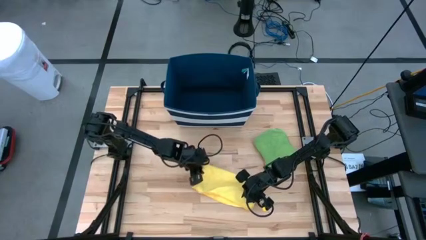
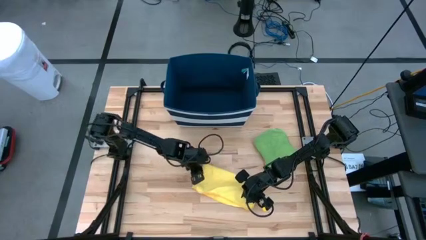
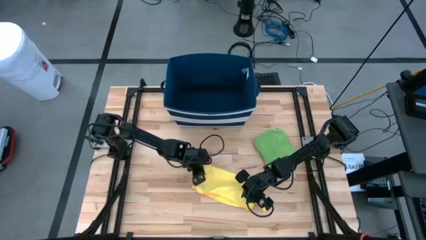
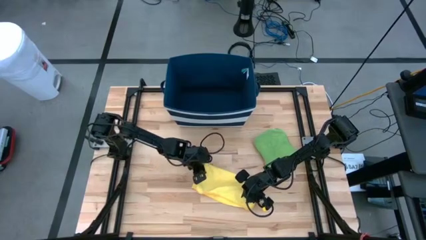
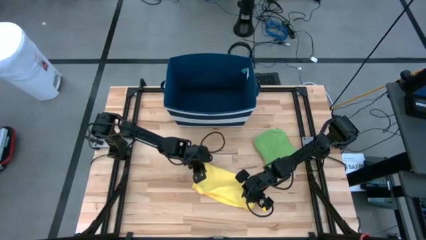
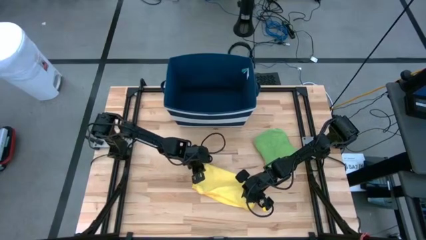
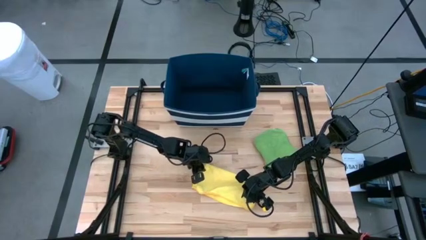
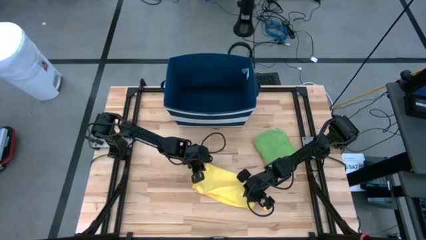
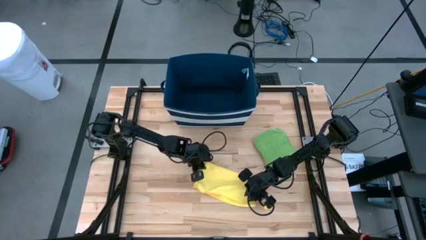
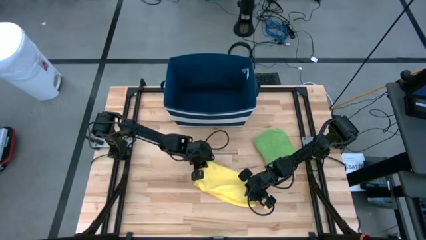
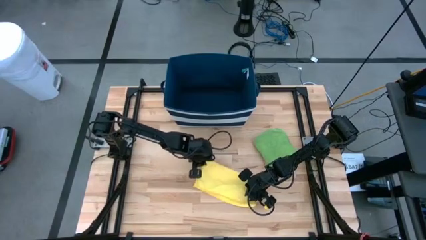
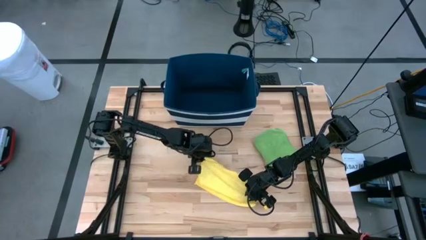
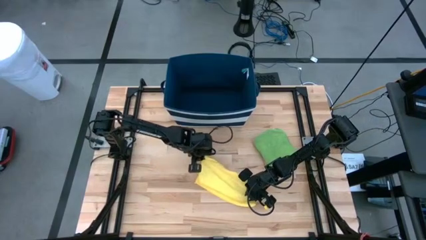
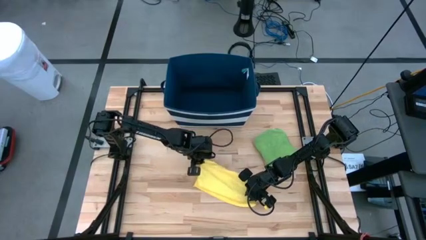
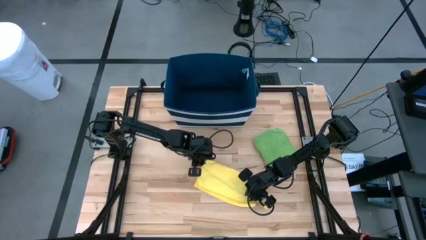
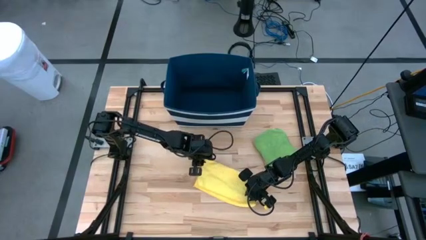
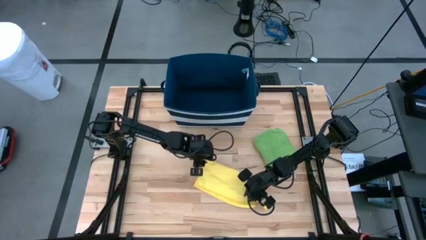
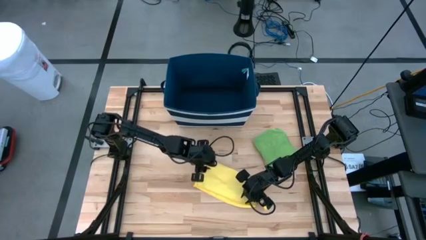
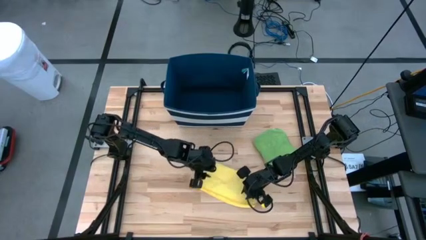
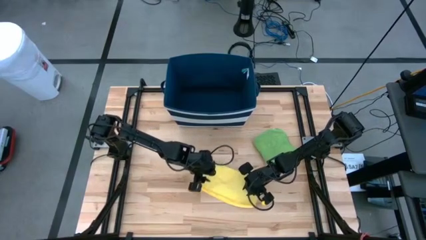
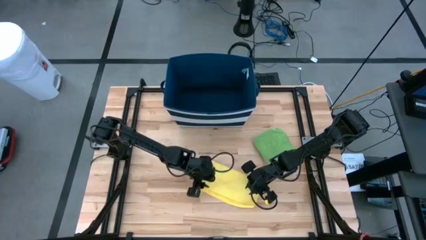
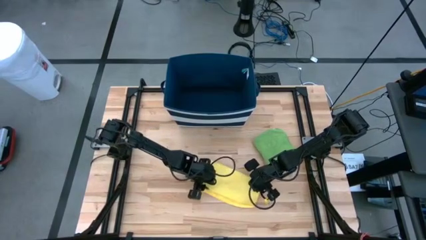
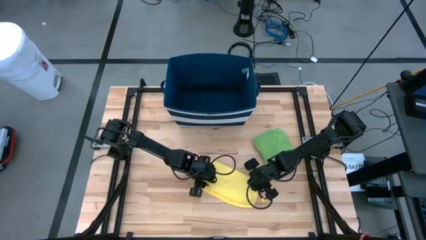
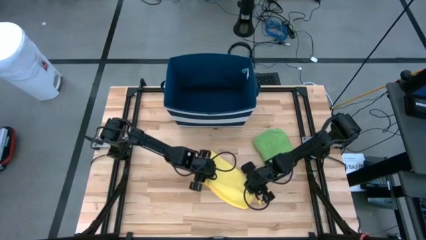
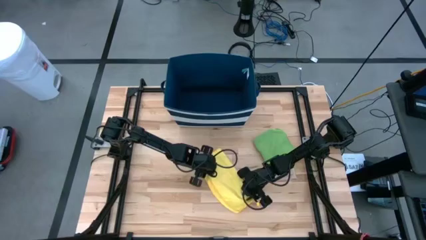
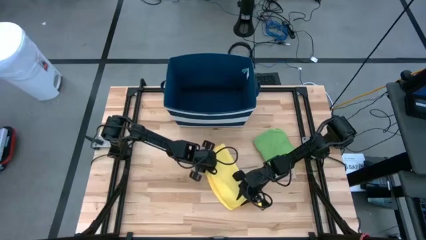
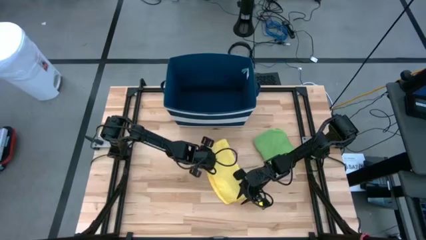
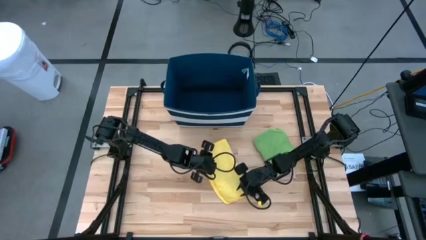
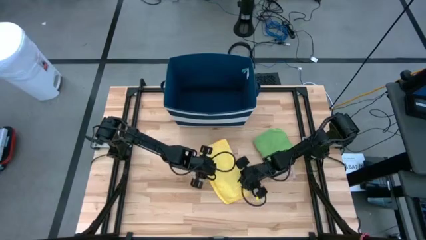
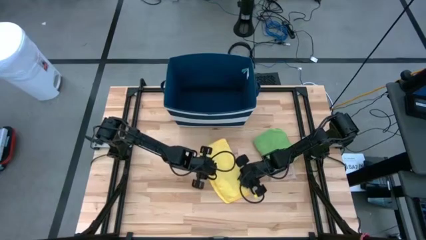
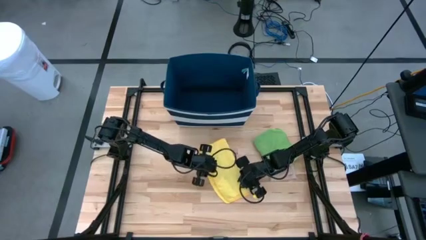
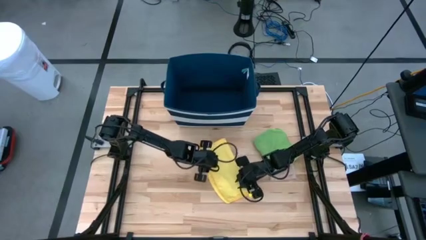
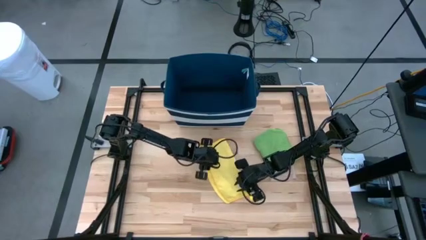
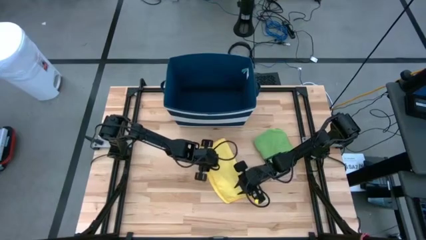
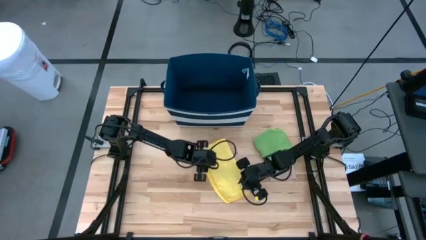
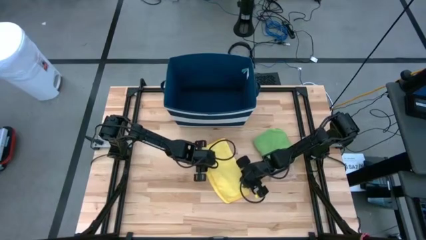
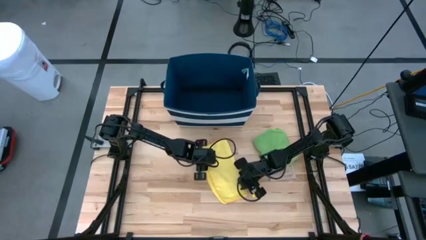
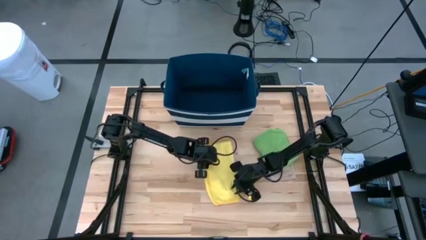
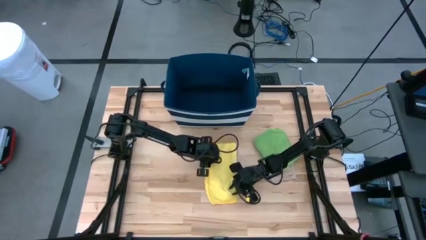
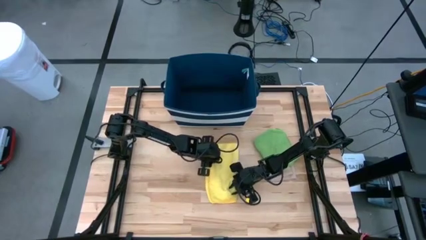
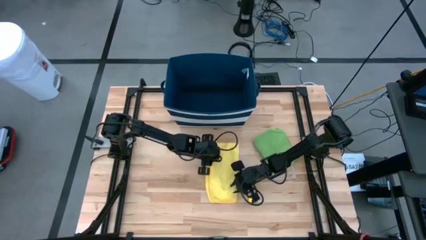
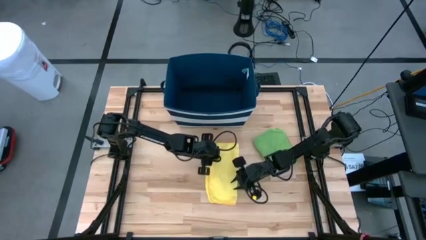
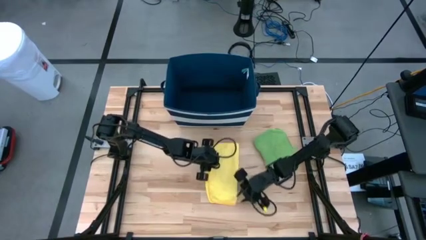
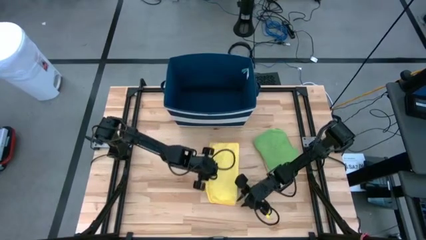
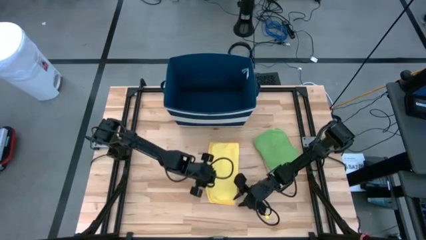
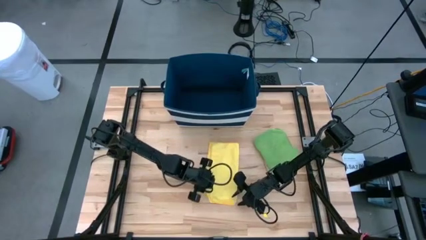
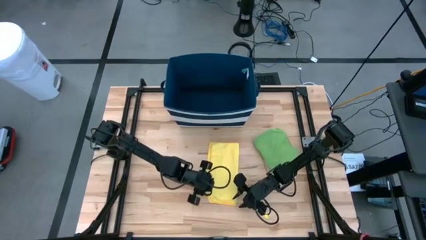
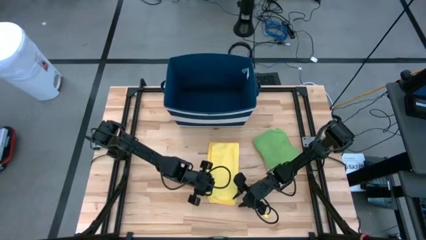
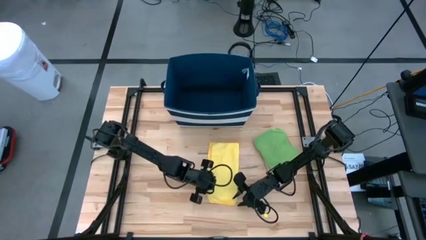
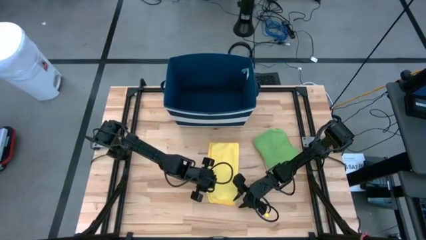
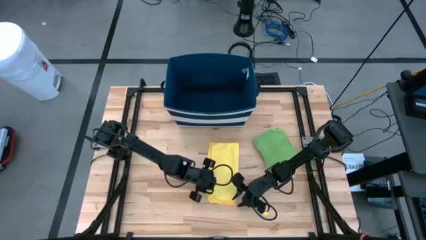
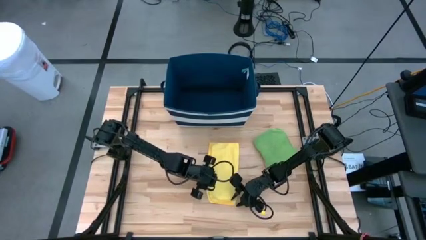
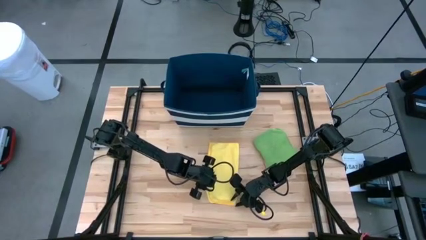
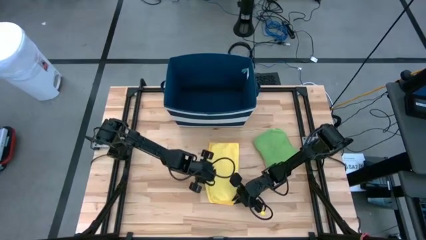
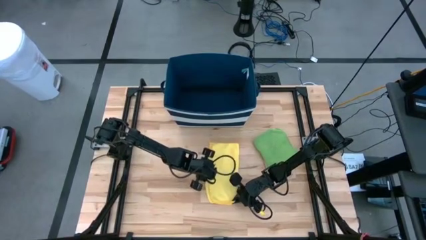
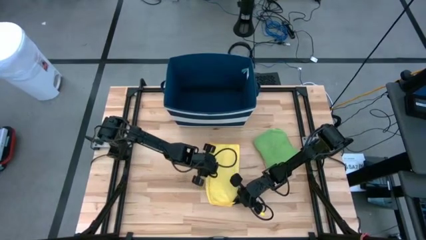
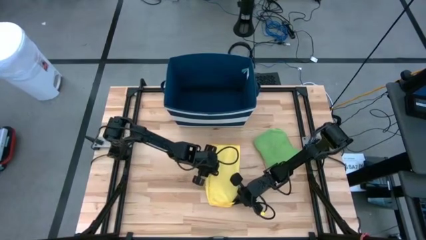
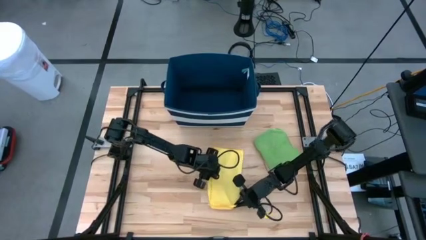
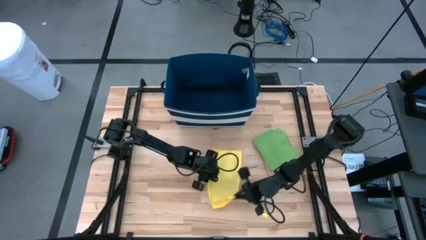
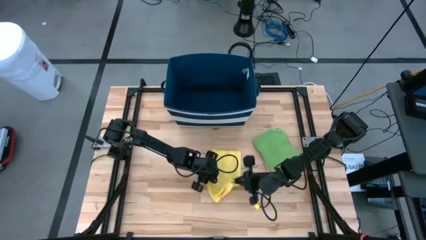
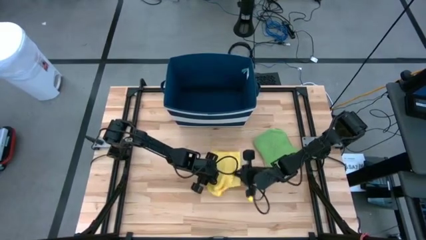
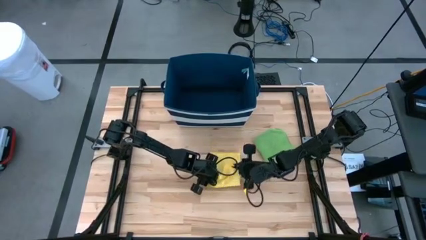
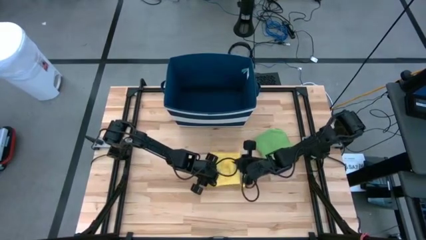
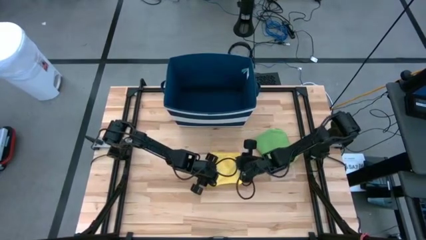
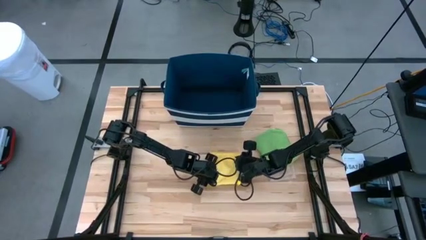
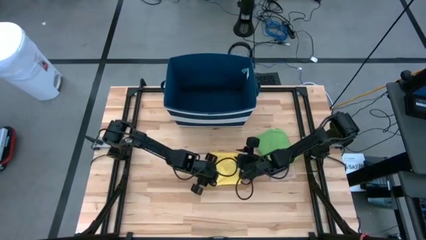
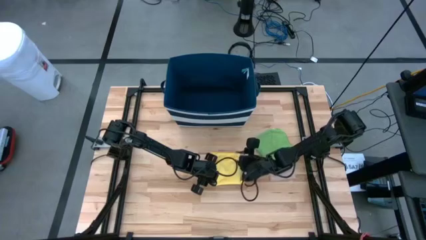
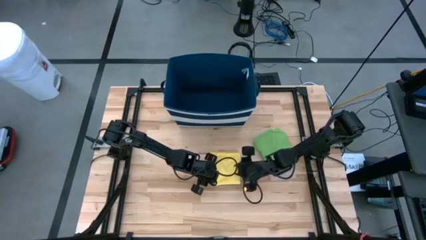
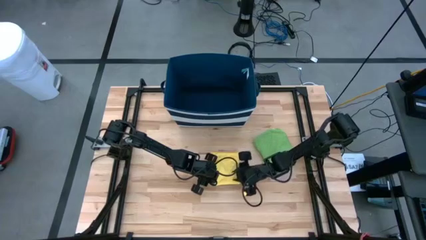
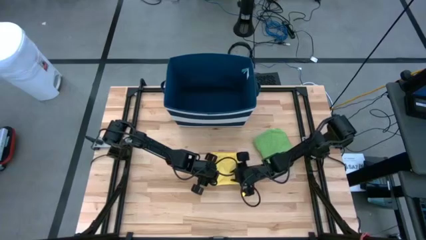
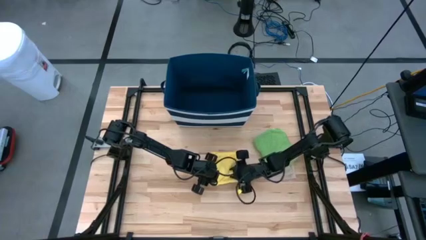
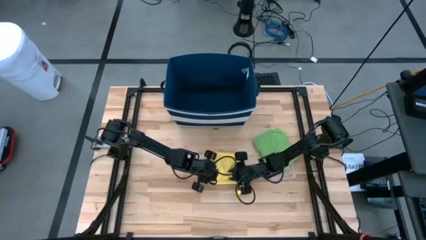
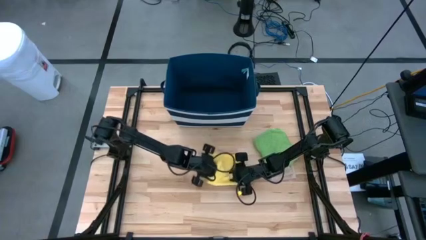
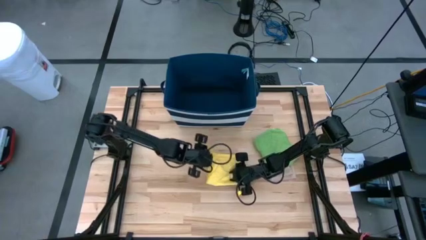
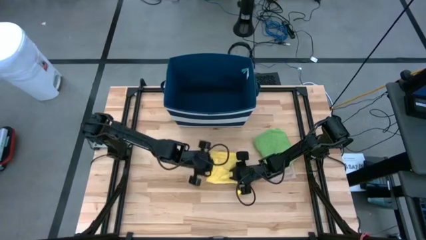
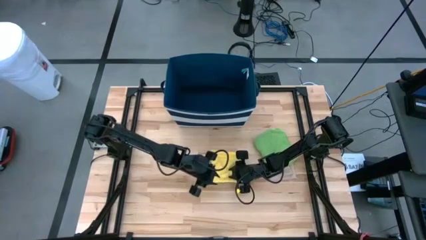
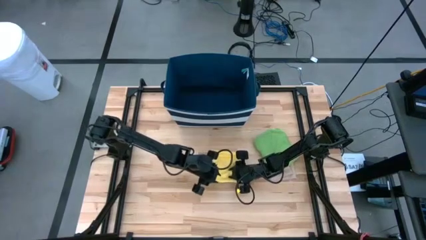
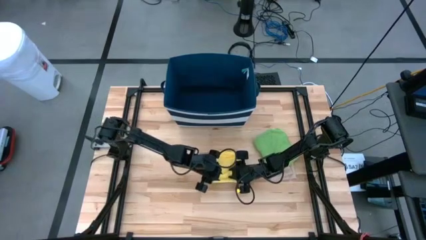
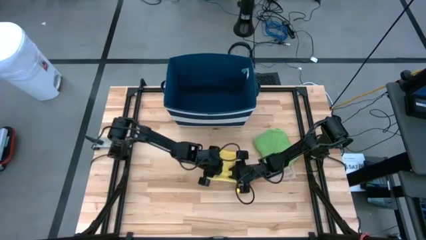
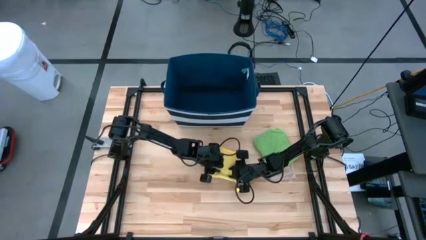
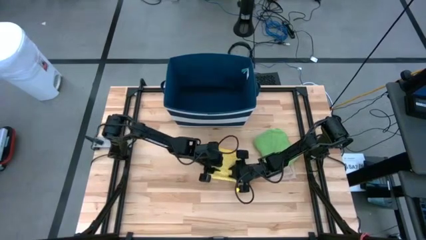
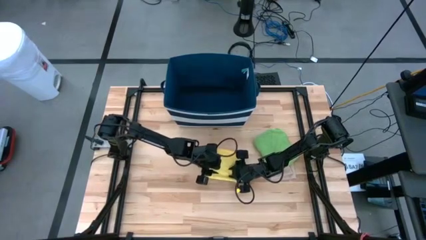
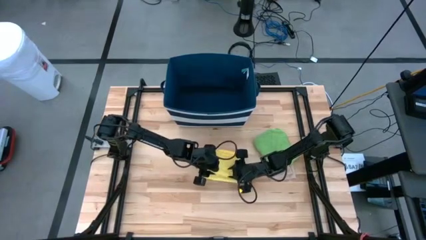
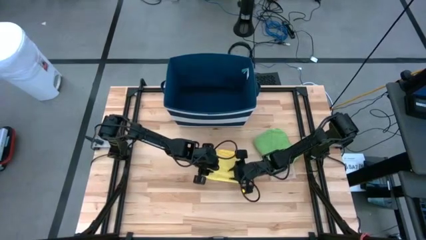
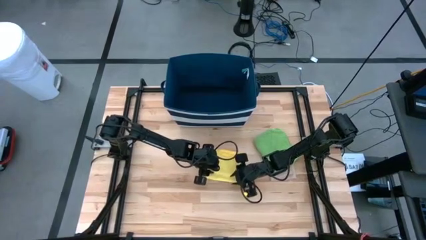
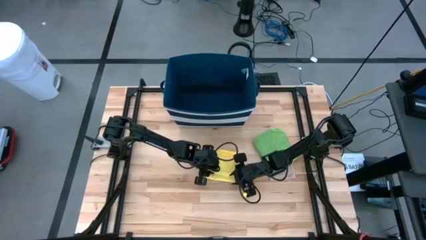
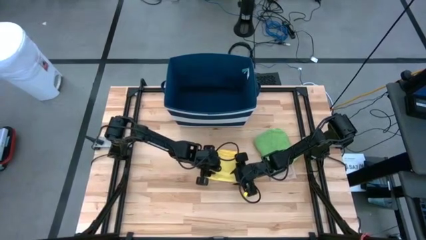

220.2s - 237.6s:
Task: Fold towel
Fold the yellow towel
